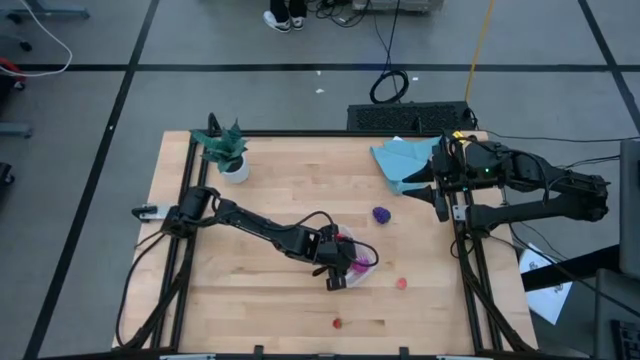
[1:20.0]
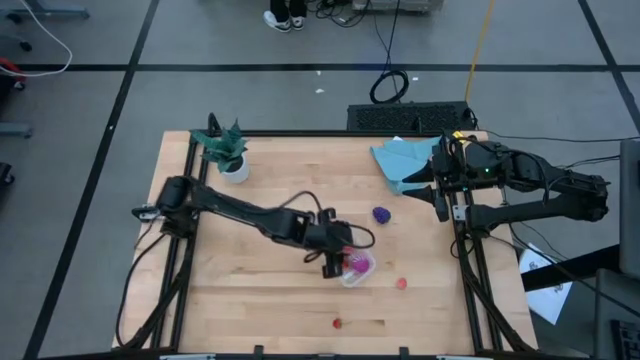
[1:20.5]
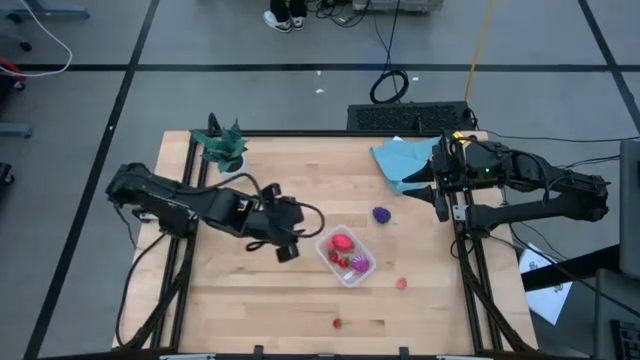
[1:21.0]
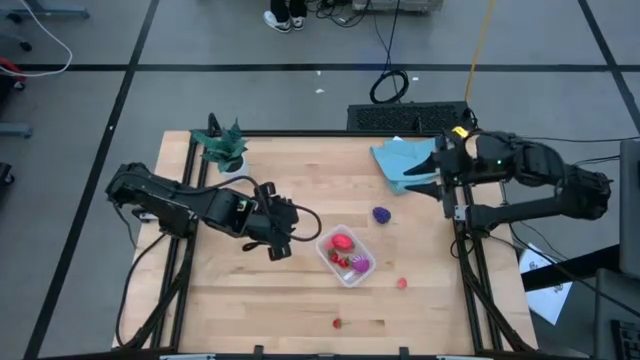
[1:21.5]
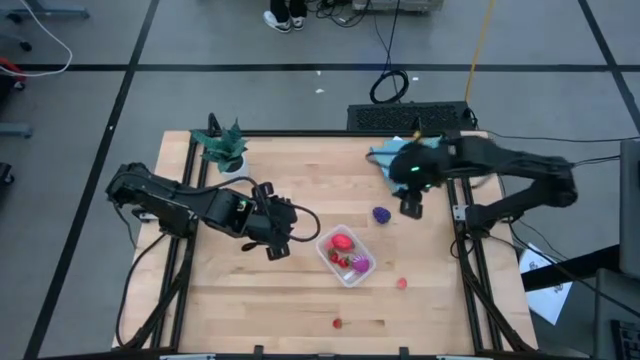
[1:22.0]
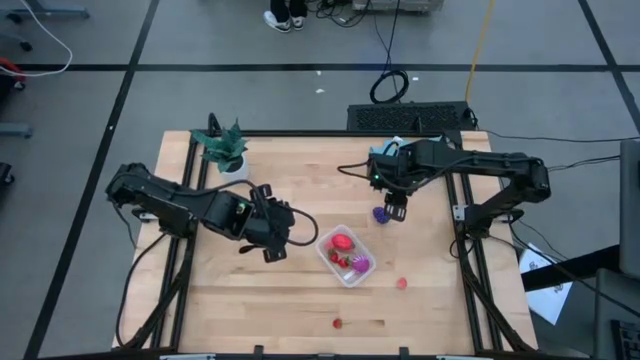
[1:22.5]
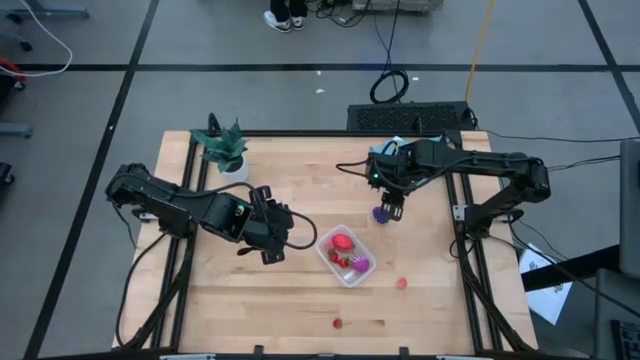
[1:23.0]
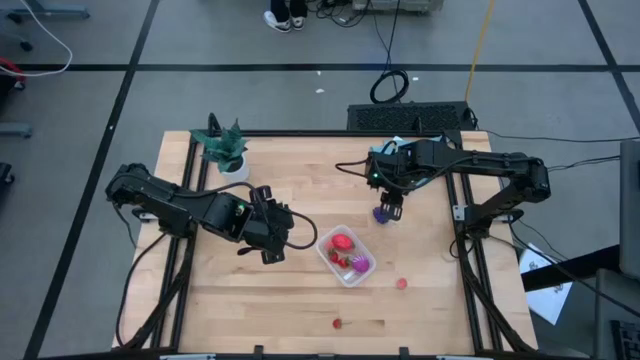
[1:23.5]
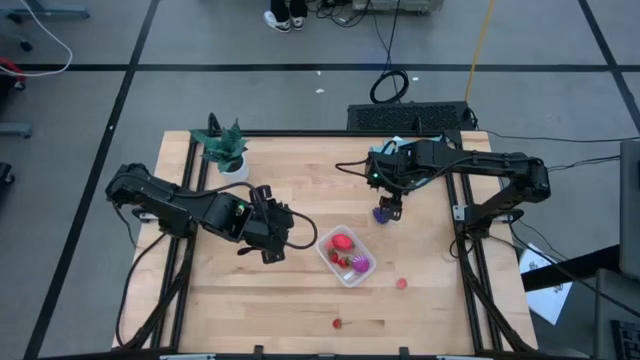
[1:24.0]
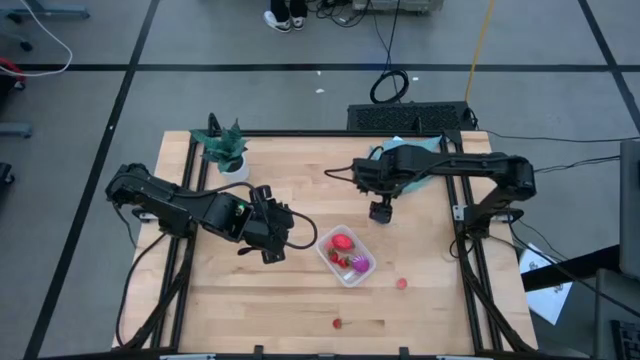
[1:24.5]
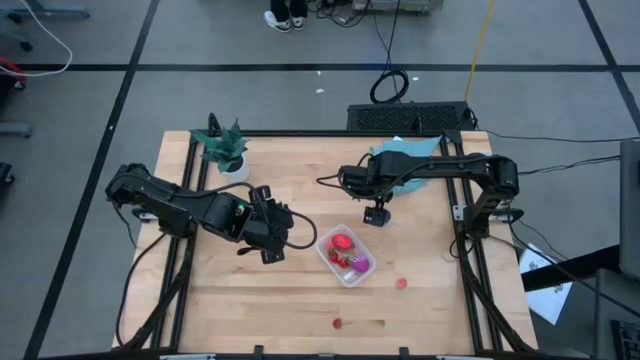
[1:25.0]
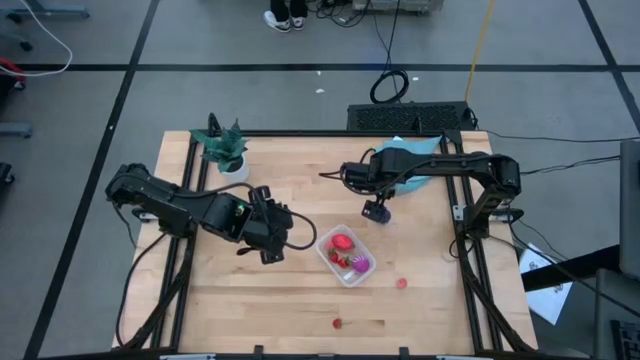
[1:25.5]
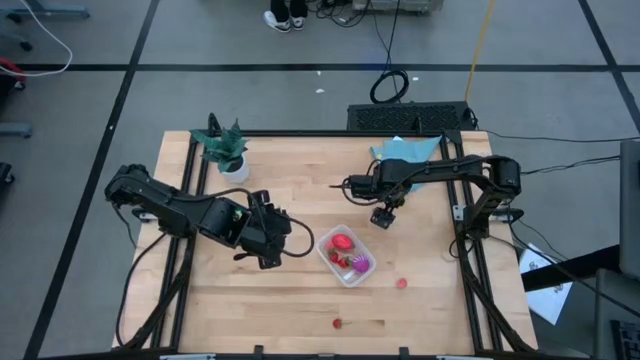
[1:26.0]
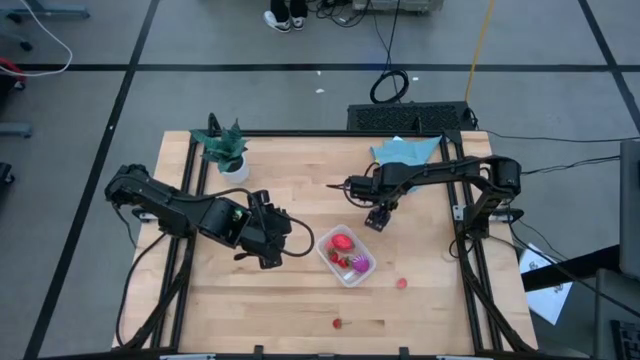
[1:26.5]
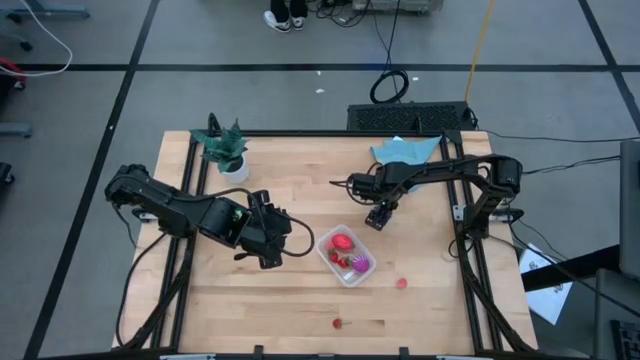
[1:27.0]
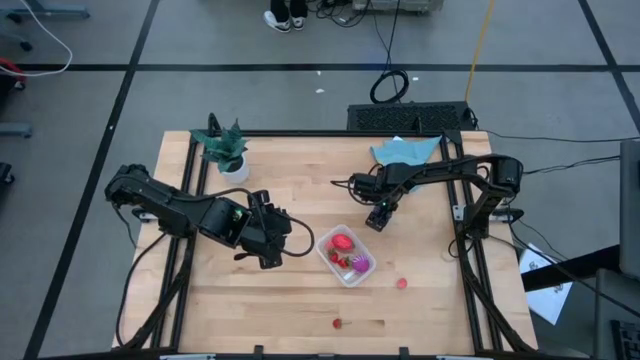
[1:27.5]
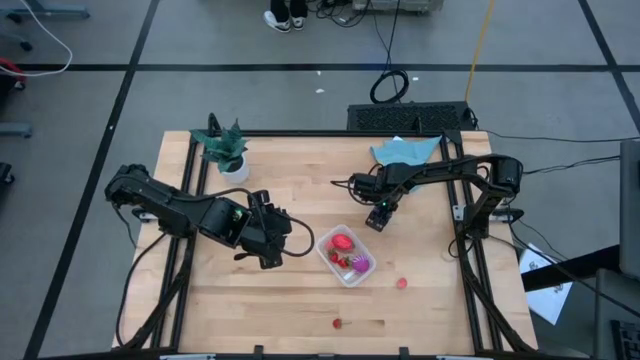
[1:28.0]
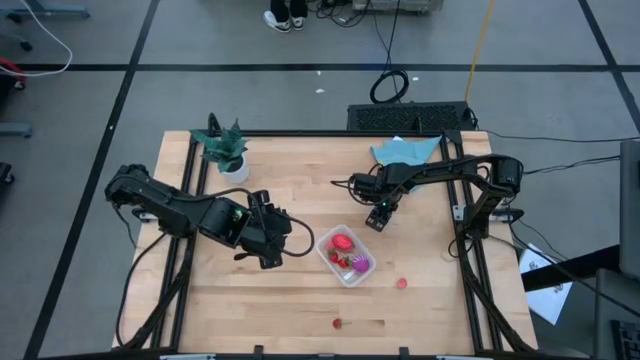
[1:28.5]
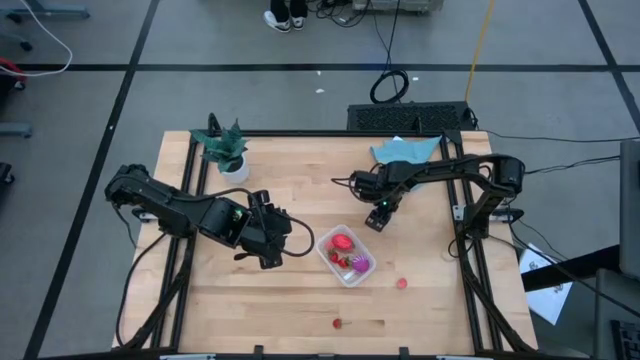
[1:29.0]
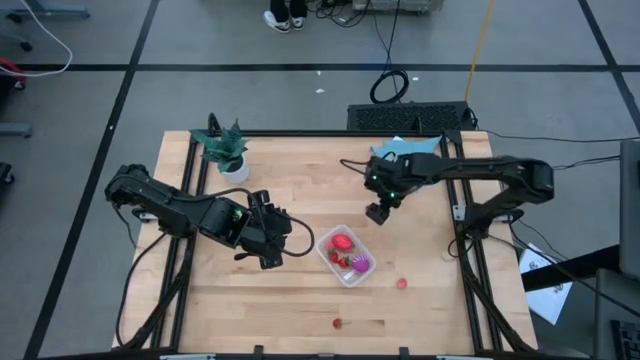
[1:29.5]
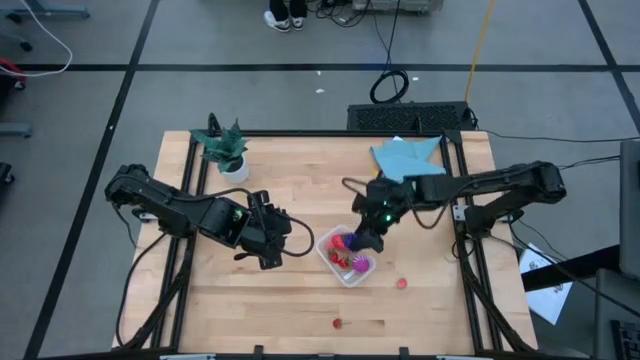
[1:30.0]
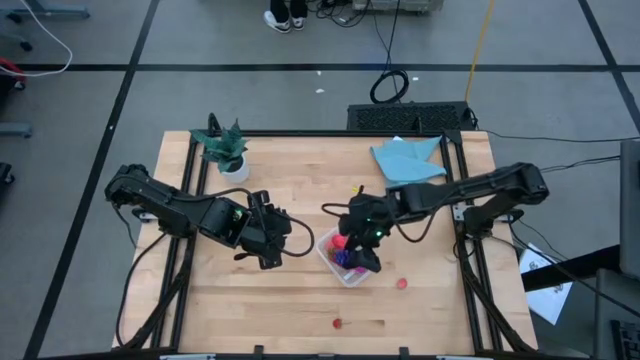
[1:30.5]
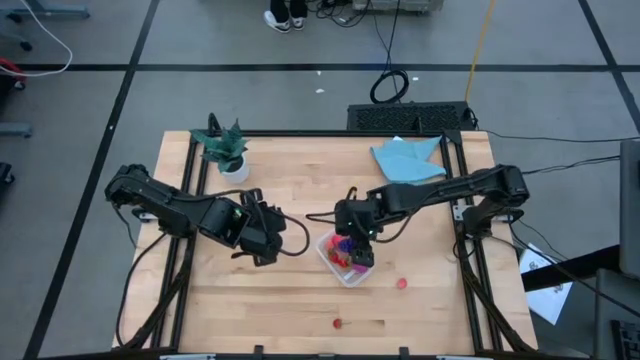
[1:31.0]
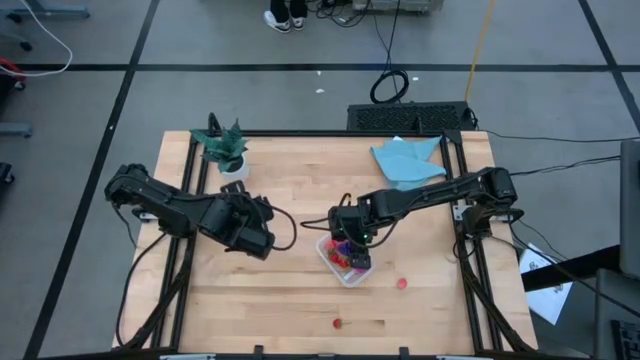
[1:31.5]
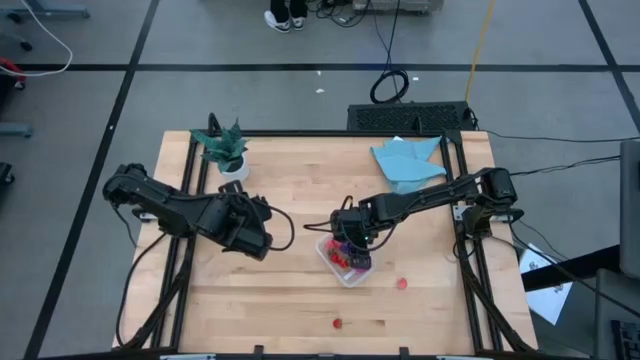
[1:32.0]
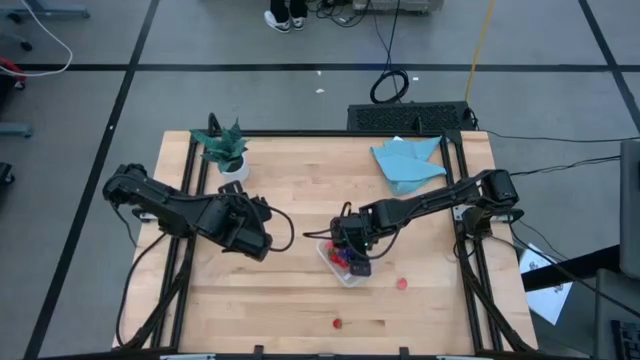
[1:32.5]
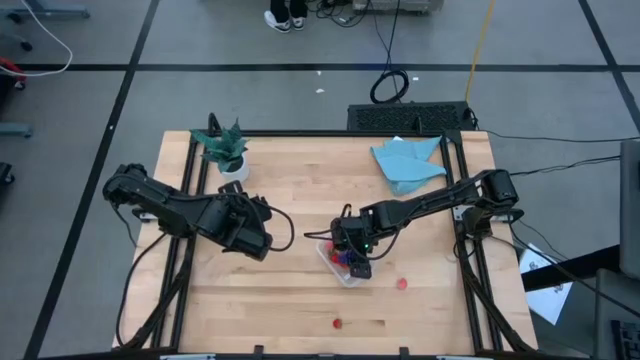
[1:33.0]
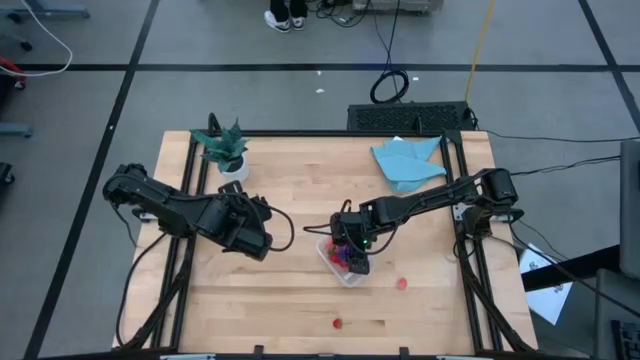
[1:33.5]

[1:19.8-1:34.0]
Task: Pick and placing Produce into tupperware
Put the grapes into the transparent container

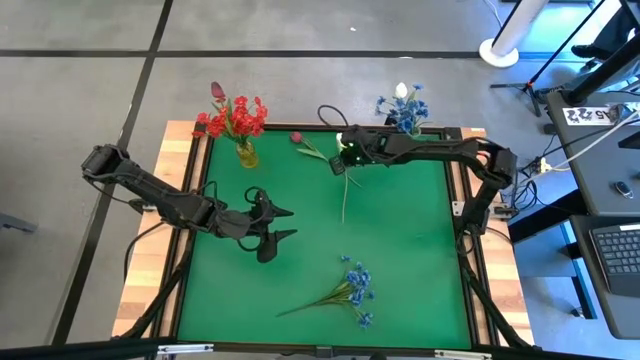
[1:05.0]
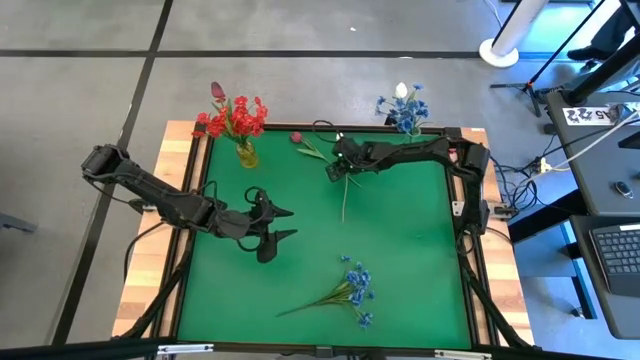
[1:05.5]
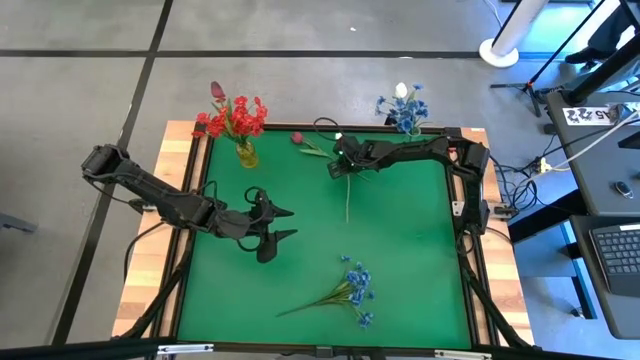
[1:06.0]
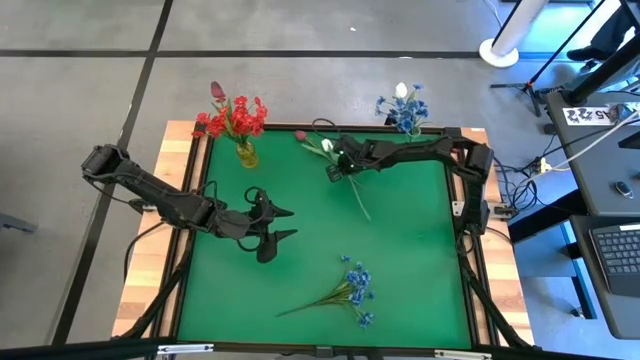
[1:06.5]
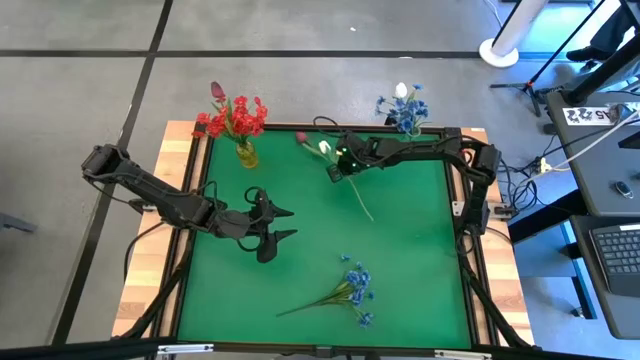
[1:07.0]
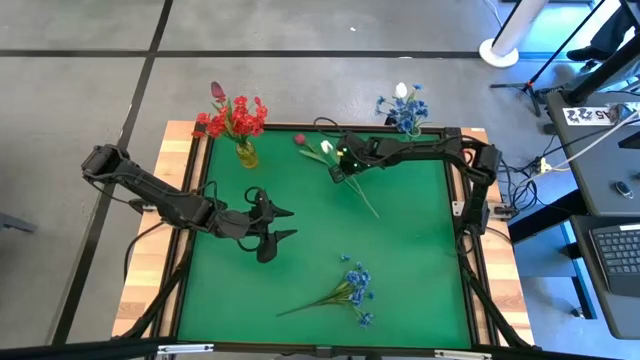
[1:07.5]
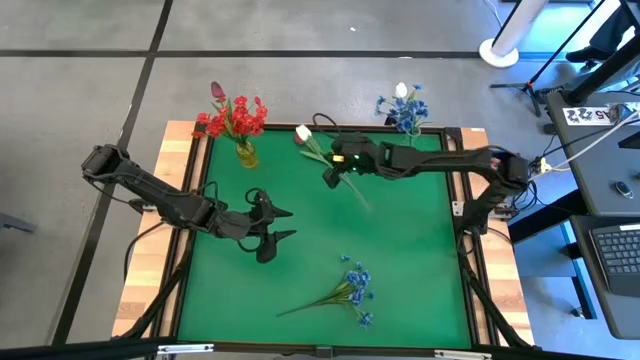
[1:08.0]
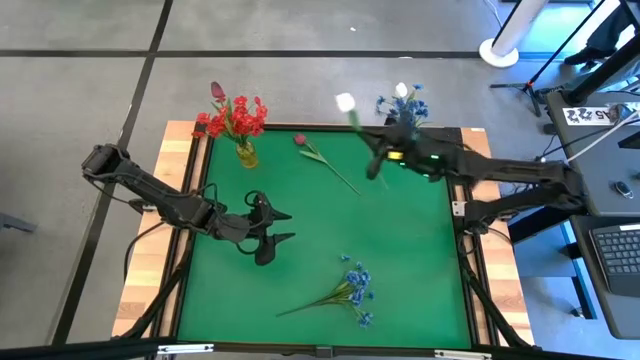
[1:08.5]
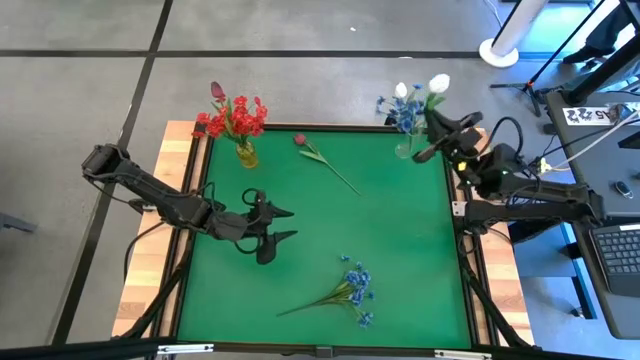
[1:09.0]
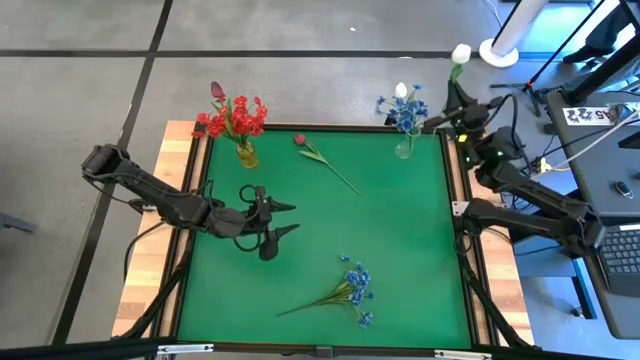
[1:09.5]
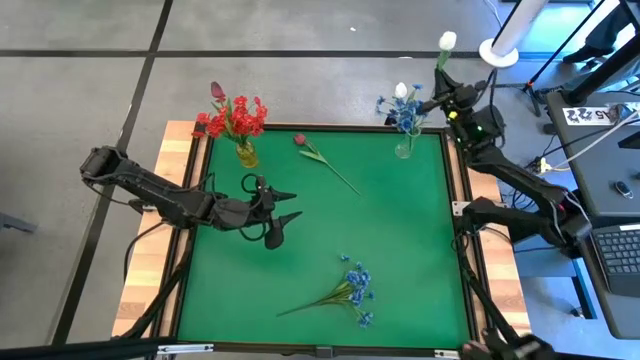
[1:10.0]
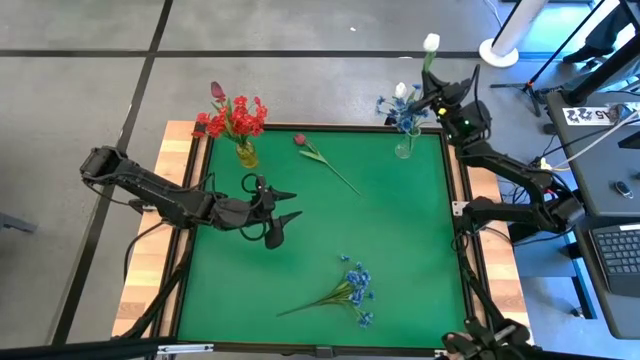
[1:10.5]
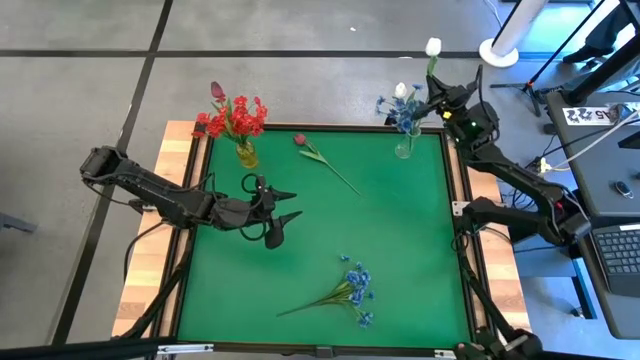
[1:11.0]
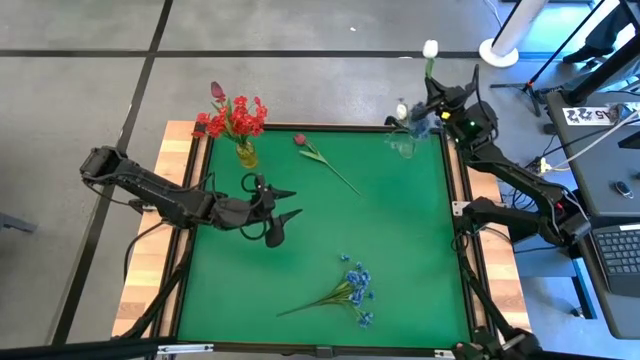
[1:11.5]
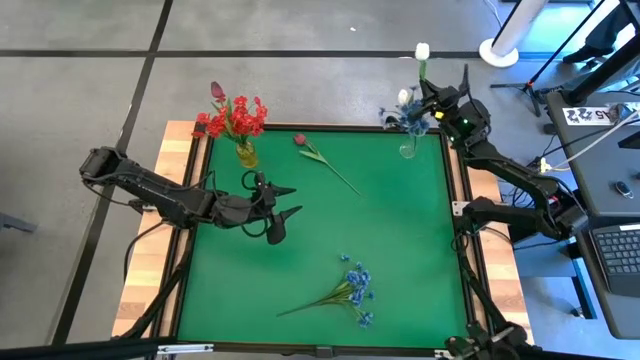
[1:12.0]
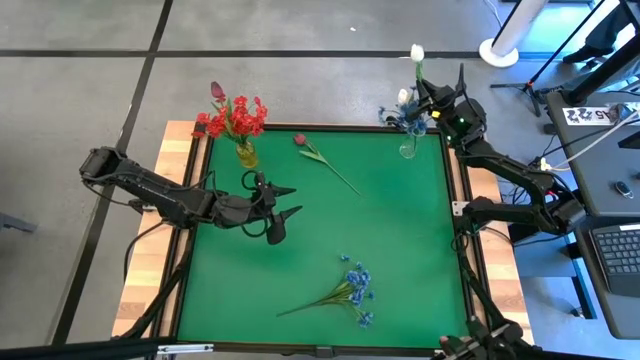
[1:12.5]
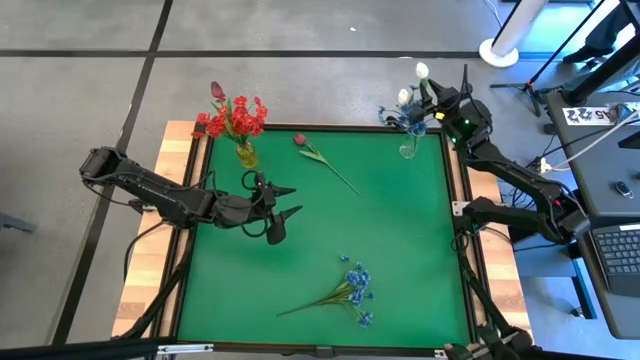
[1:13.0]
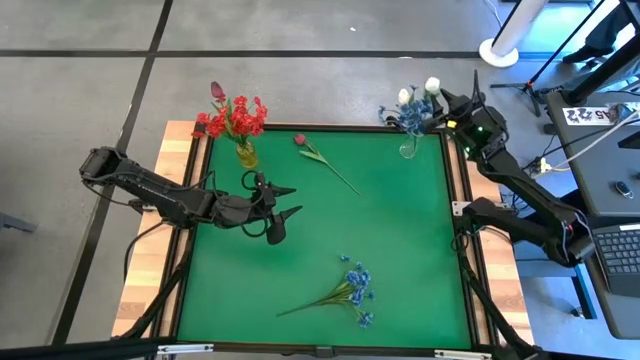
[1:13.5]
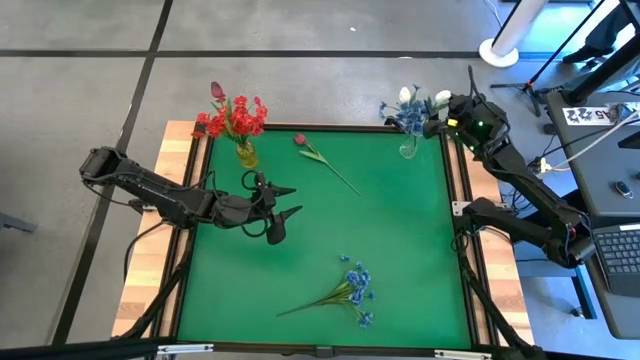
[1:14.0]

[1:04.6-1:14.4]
Task: Sort flowers into vase by color
Put the white flower into the transparent vase
